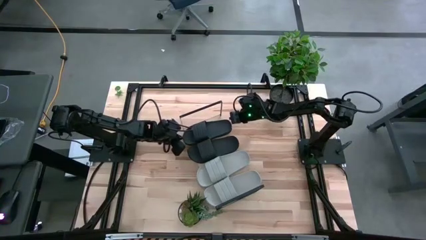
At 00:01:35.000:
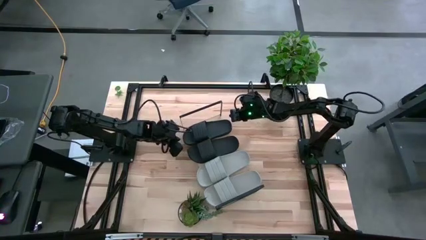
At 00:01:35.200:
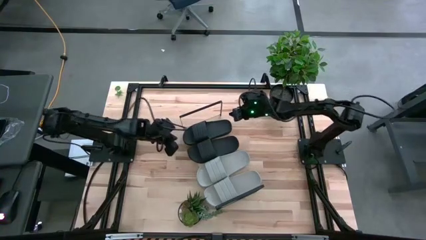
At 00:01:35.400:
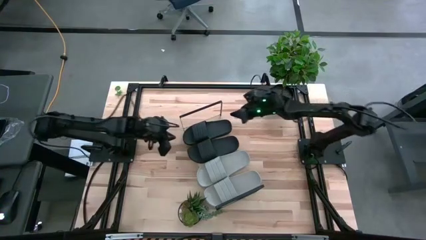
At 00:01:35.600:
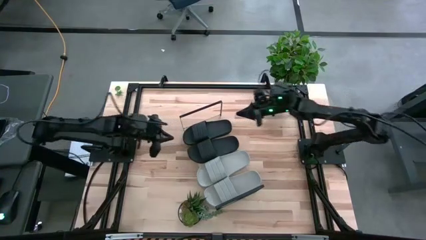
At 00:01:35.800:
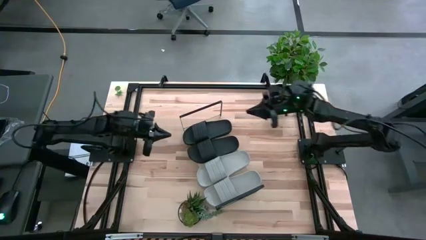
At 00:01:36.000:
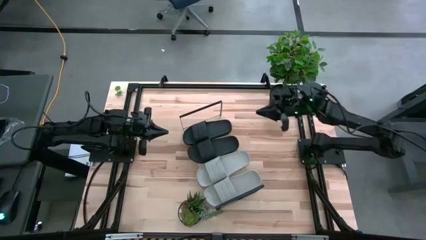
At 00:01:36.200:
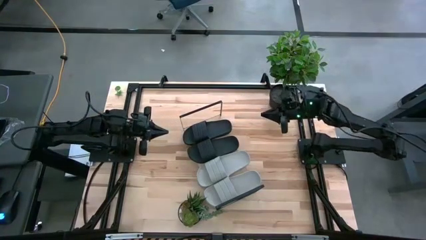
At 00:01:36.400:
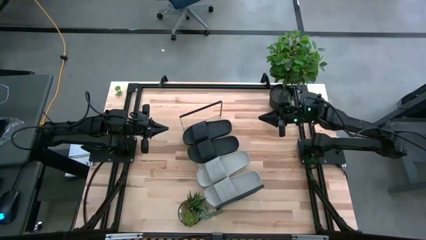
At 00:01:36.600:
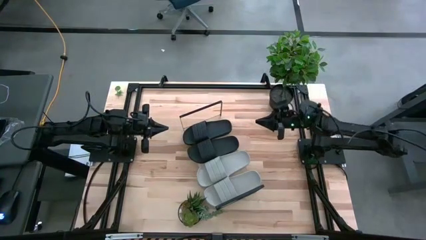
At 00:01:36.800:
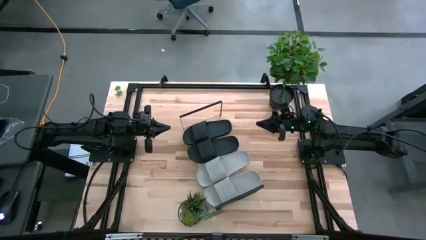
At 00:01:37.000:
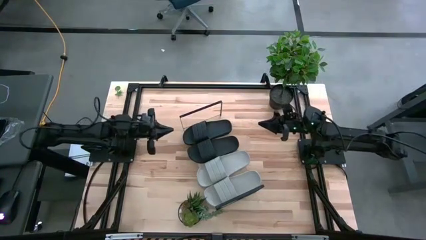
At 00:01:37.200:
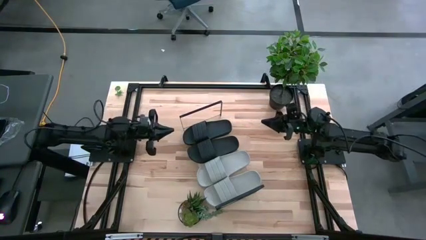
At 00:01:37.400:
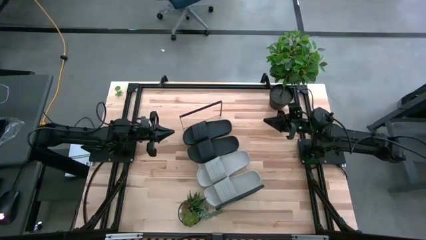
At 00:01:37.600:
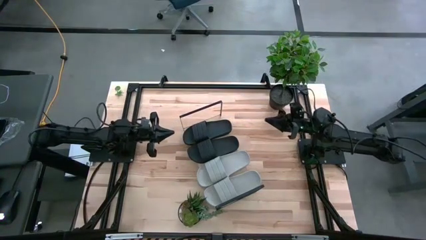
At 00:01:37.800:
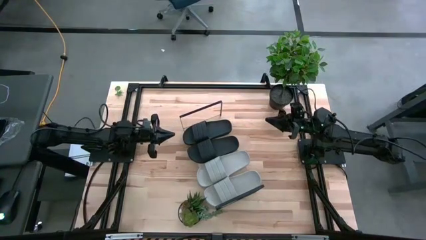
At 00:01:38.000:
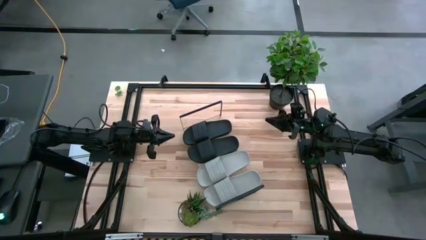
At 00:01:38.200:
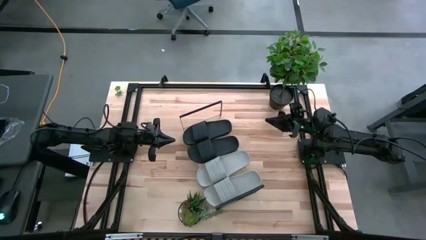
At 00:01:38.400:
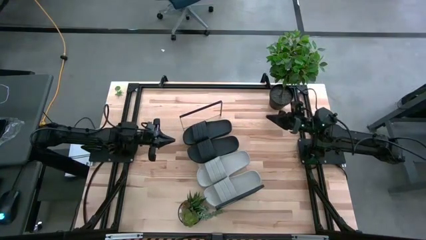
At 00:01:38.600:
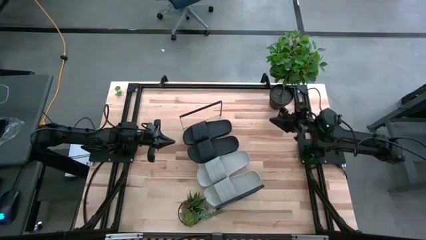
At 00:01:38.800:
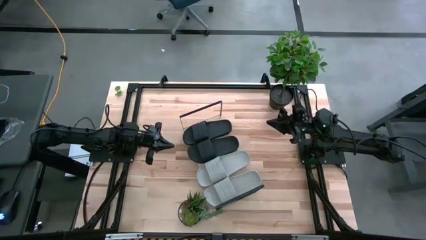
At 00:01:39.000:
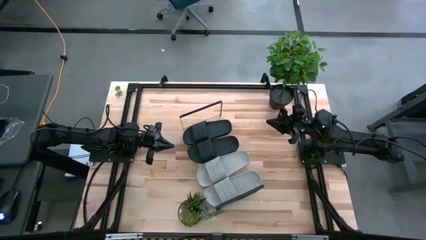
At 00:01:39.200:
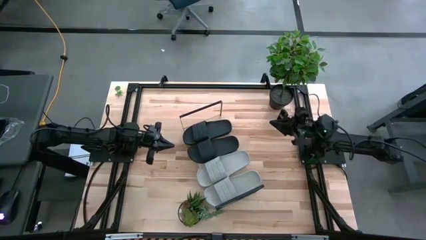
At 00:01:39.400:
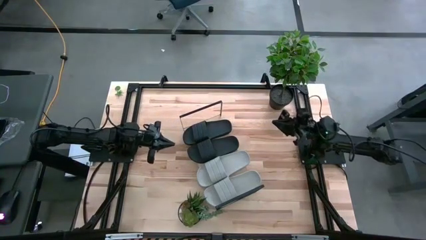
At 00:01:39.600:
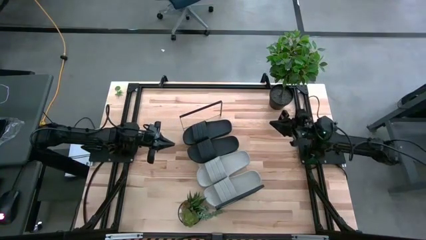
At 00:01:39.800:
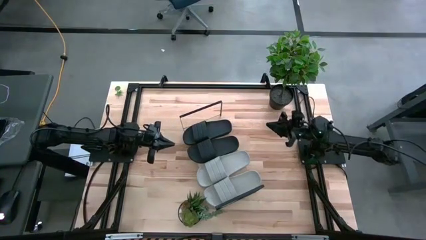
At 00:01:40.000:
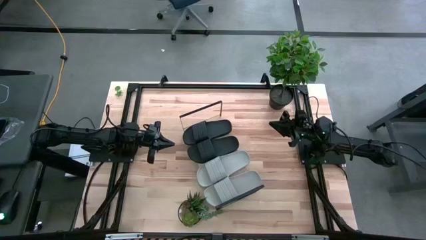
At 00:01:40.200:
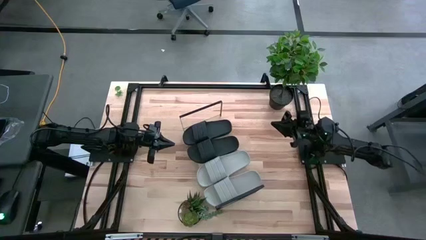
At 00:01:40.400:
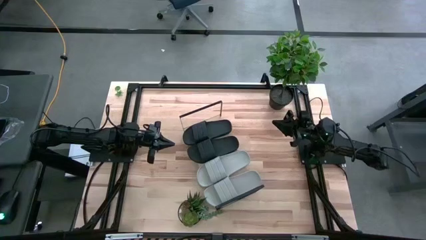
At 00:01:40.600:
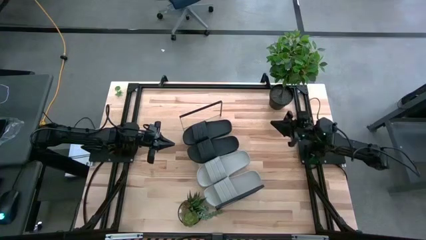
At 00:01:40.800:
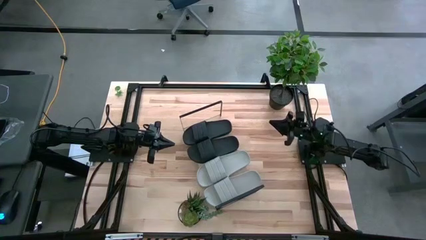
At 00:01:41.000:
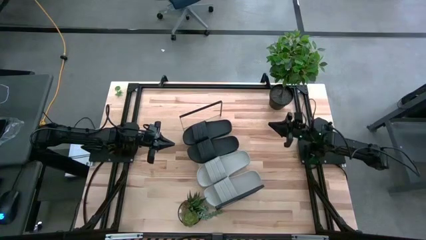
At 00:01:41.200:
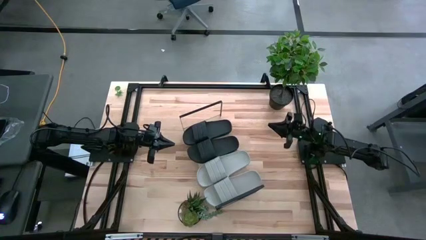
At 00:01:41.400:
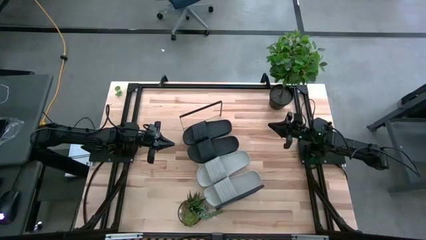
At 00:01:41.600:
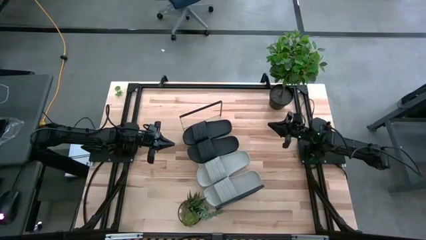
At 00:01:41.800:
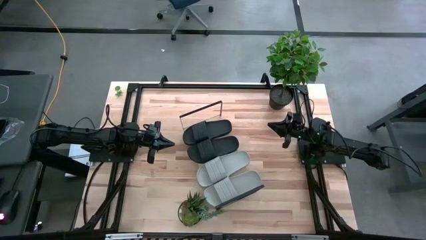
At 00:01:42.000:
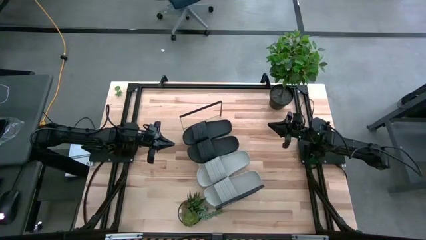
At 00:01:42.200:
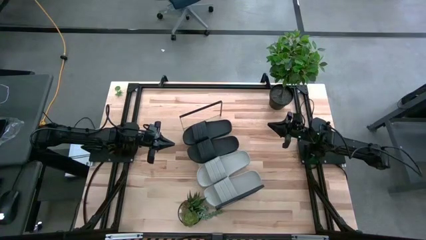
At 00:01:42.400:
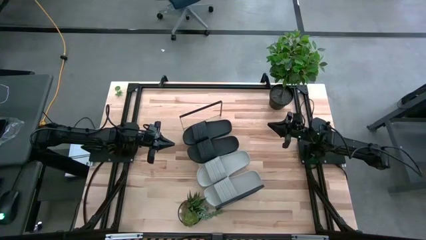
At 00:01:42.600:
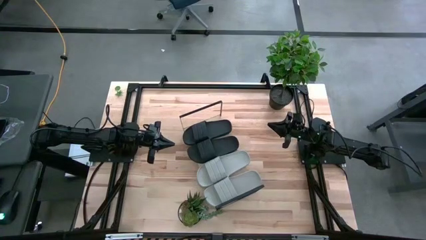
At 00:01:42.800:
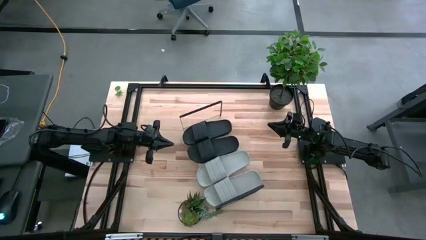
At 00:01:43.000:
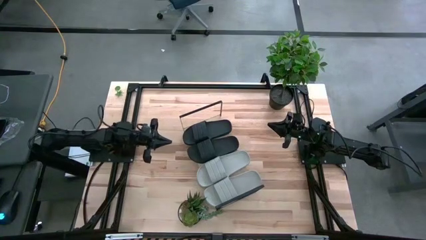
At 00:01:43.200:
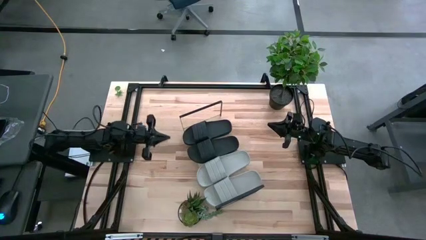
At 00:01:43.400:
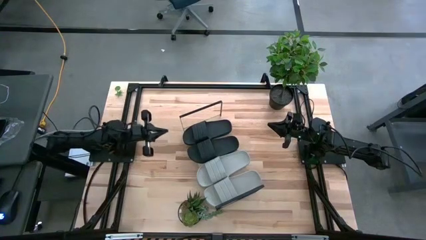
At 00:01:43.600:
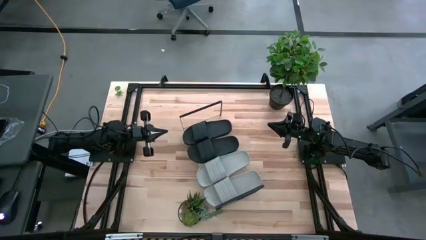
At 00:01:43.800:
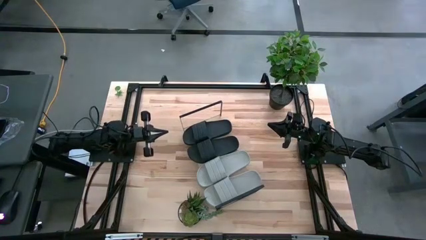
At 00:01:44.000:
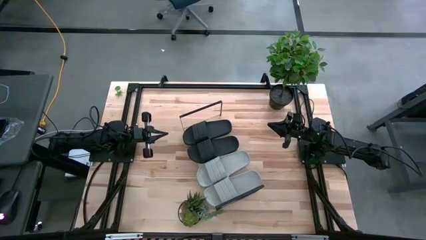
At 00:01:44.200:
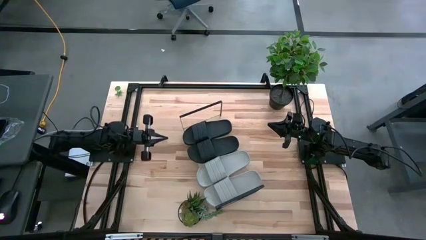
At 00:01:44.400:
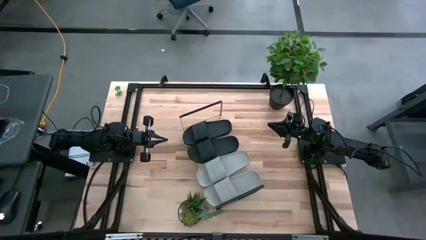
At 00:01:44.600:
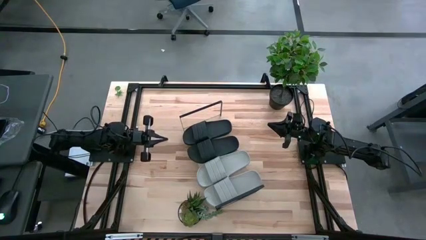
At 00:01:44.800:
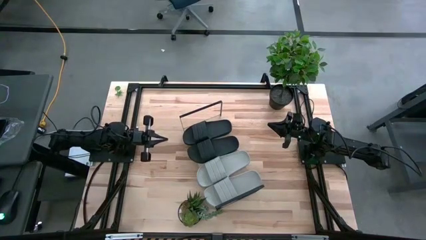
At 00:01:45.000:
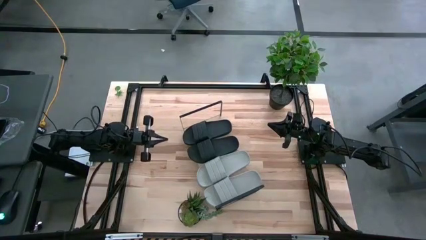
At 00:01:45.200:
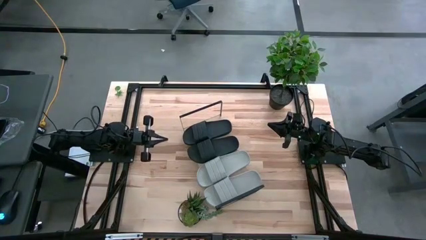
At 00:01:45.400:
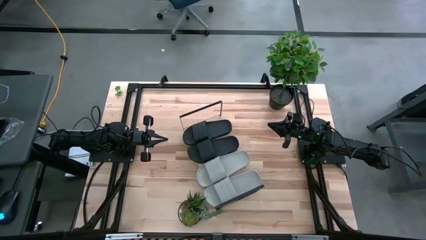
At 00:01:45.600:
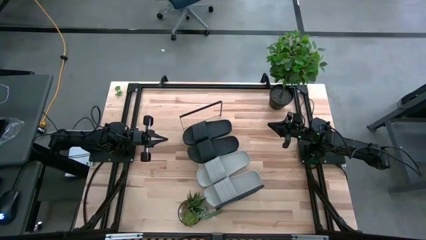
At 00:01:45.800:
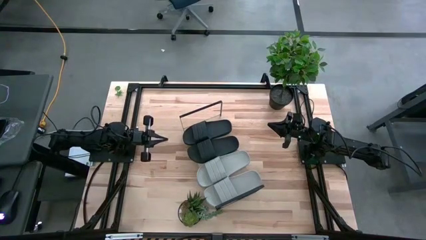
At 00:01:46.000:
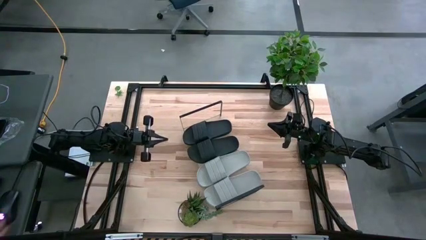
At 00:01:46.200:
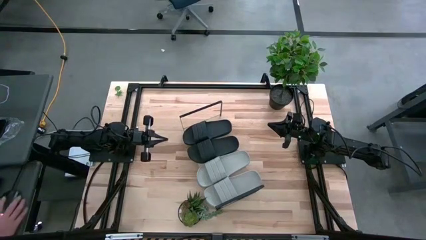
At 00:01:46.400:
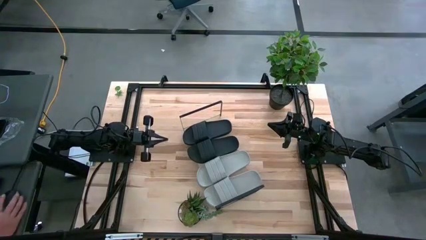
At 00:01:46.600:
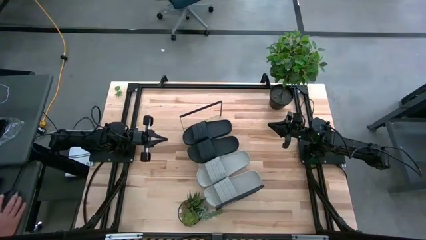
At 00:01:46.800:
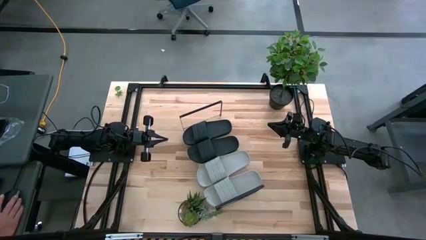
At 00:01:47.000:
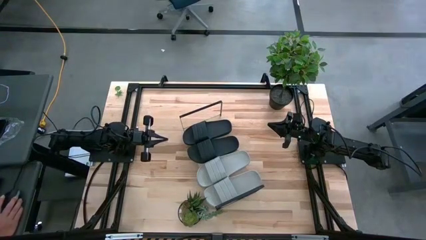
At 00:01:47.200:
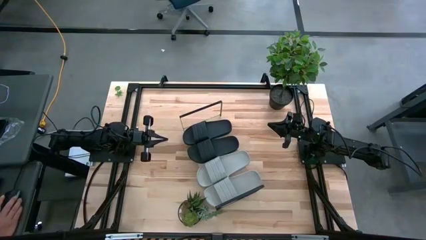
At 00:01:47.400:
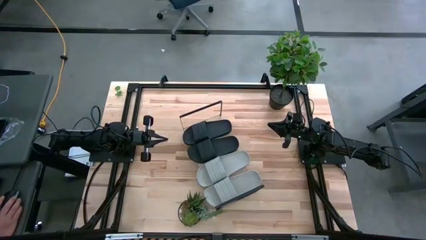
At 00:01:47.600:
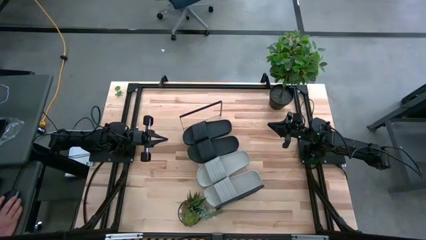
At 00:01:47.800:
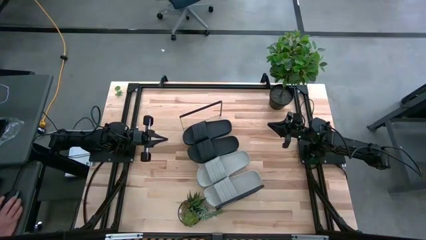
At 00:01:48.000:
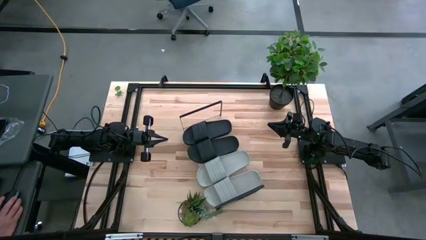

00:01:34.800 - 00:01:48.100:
Task: Pick and place slides into the shelf
Return to Home Position
